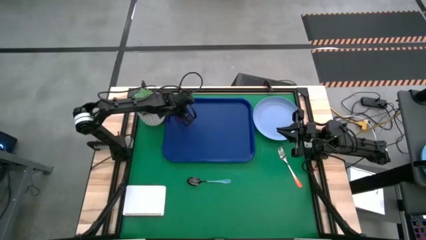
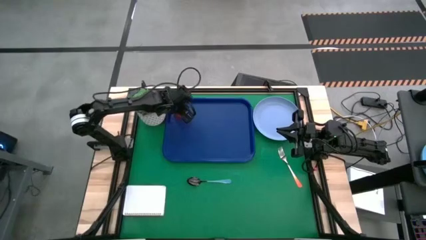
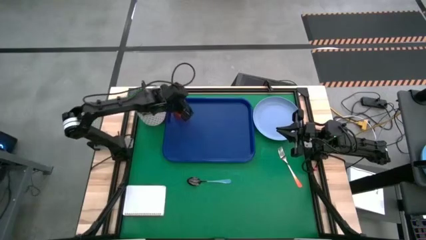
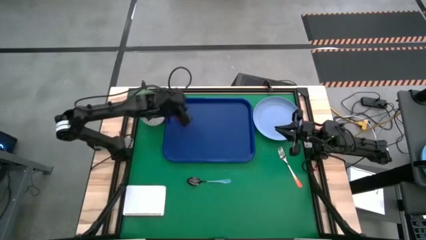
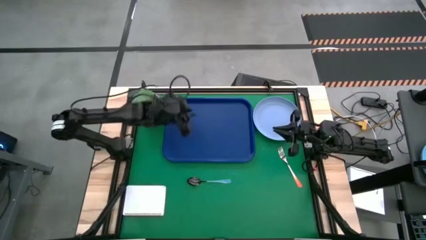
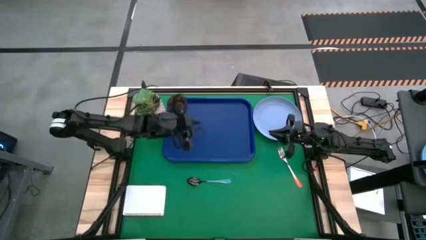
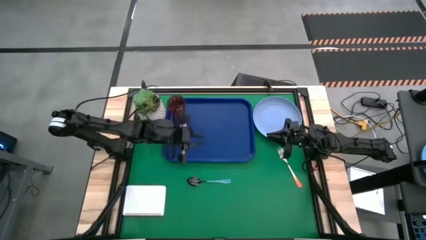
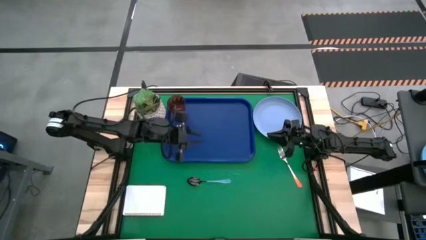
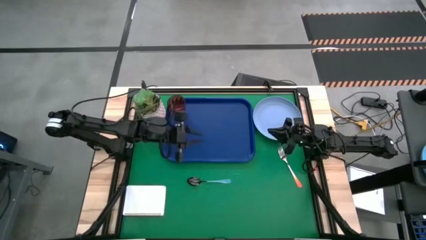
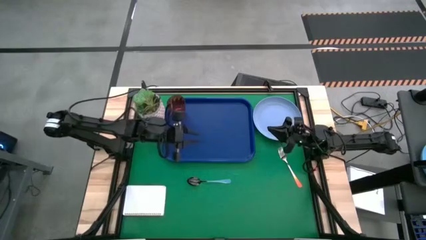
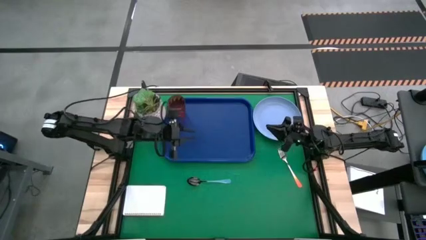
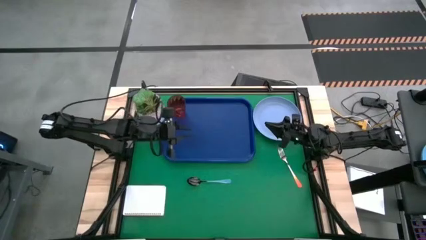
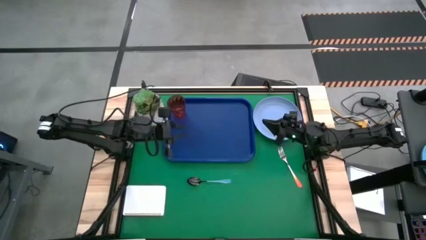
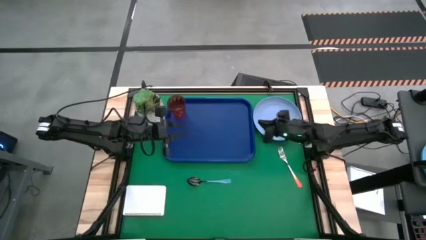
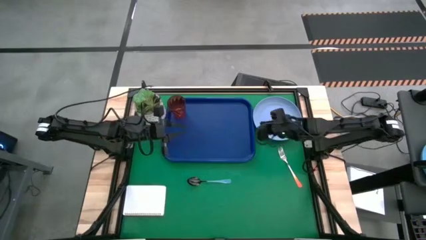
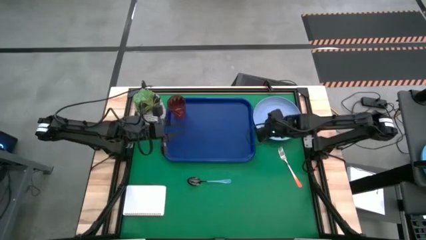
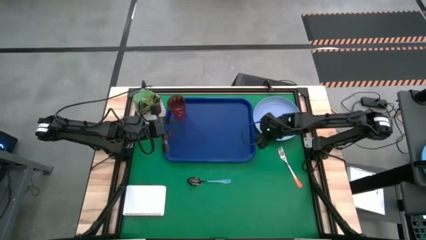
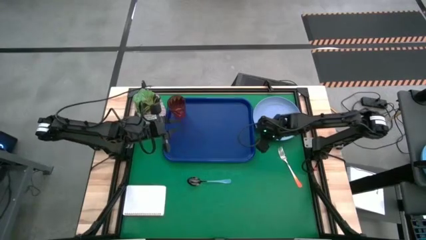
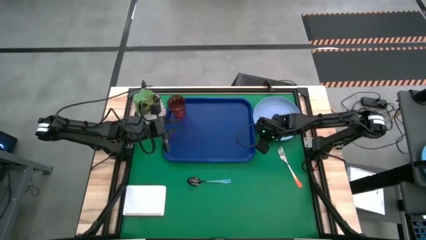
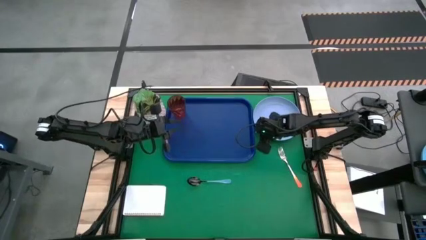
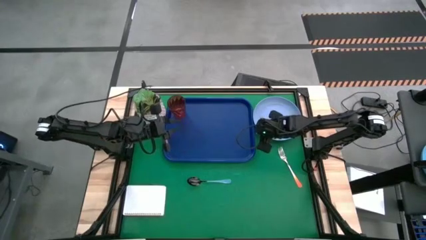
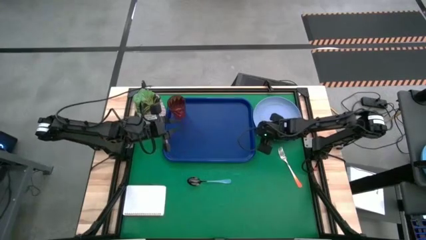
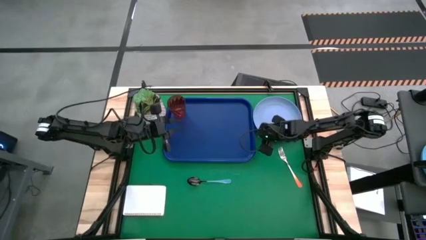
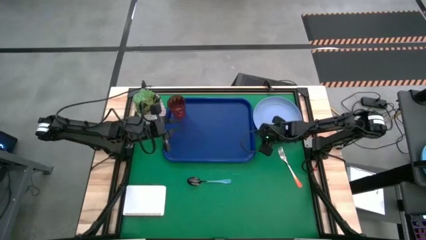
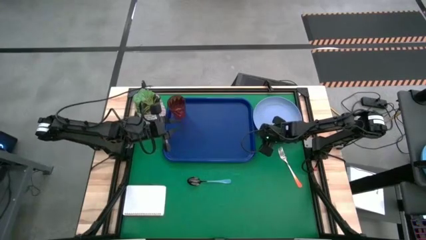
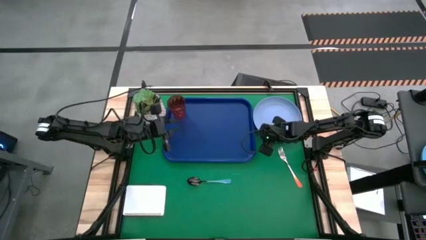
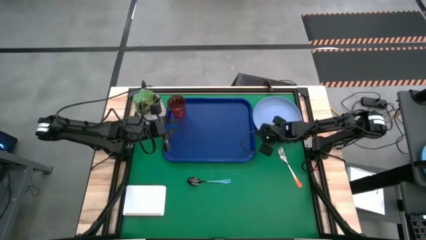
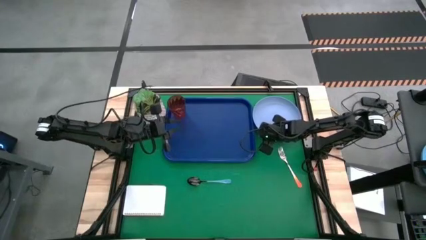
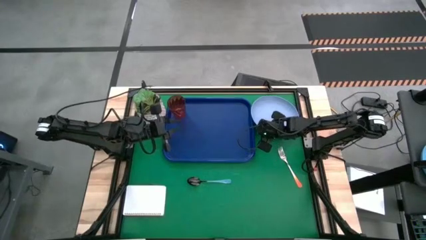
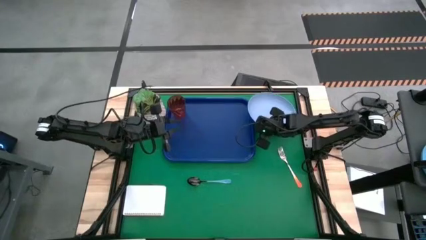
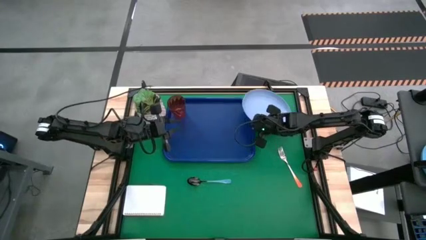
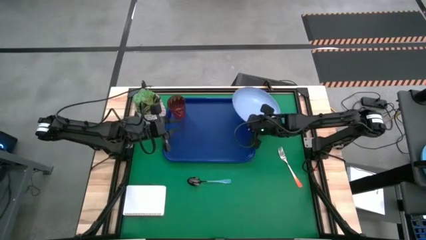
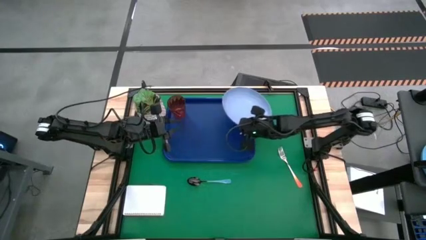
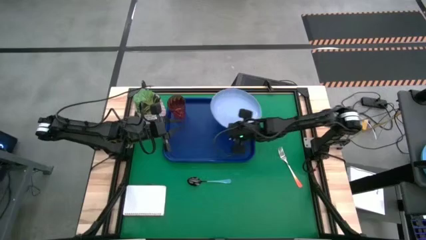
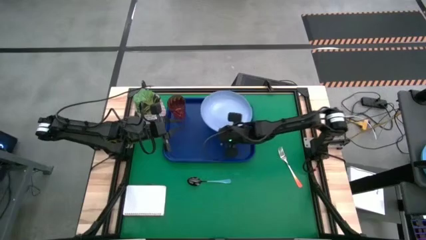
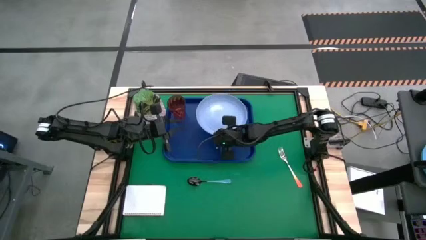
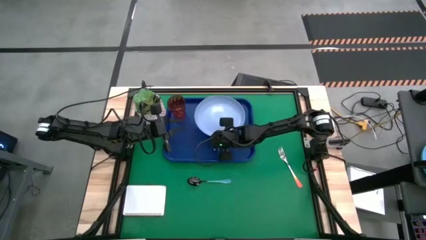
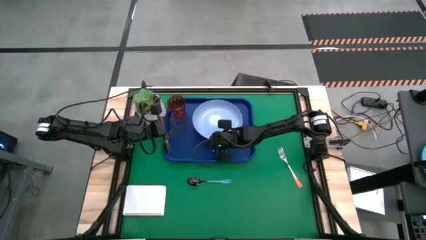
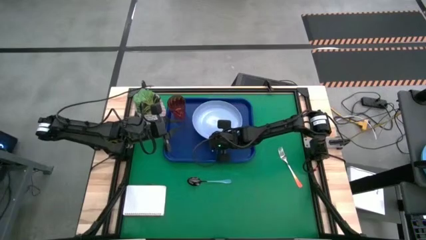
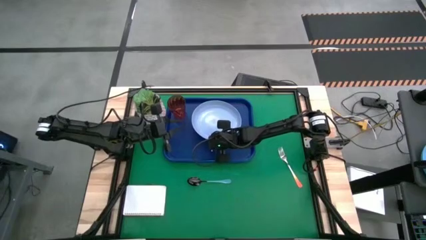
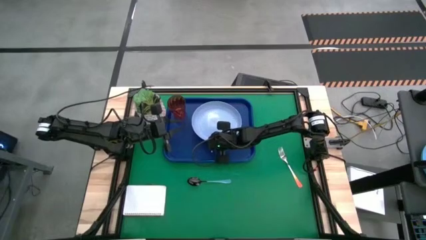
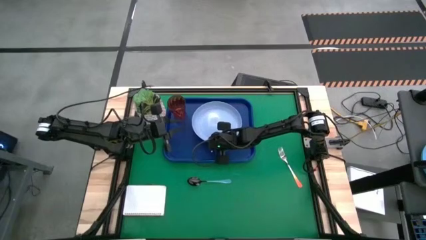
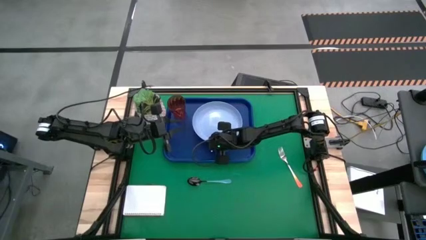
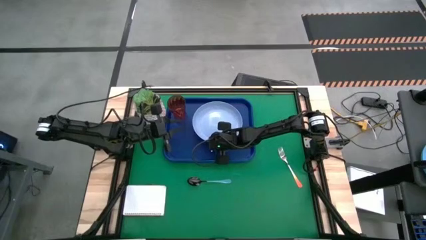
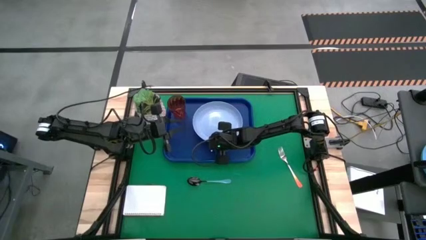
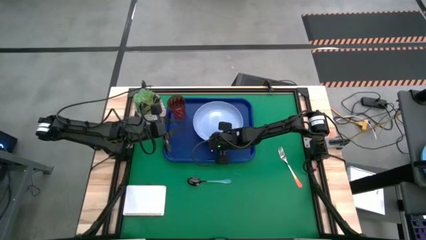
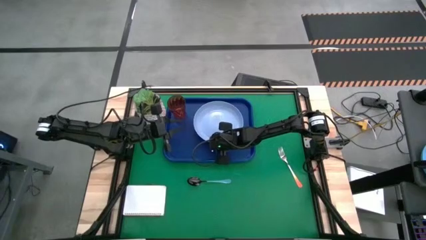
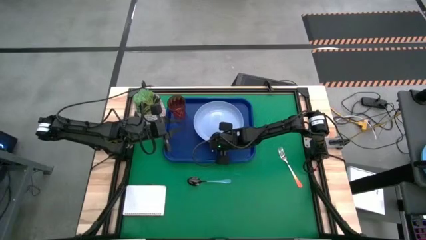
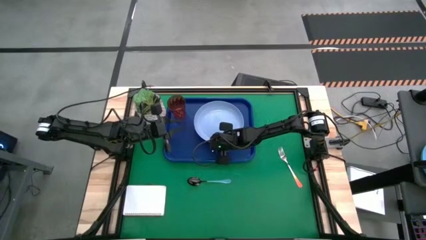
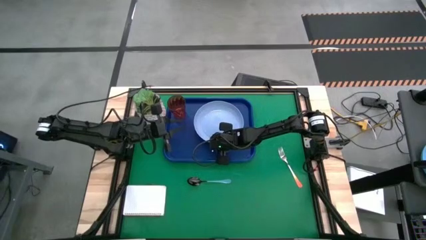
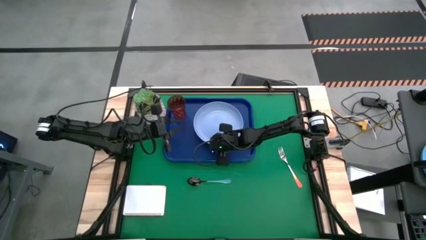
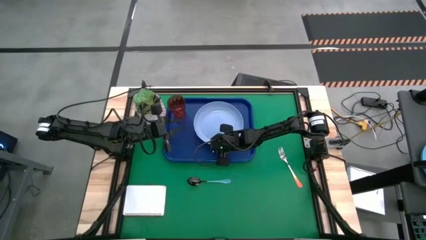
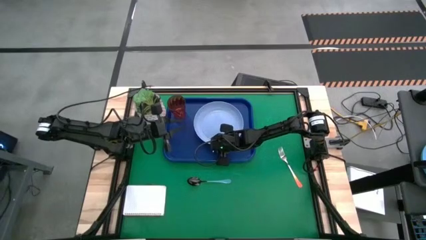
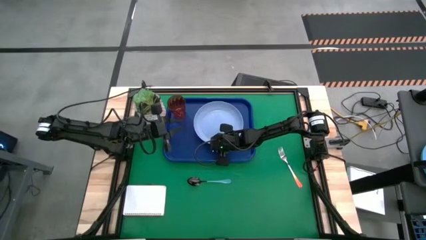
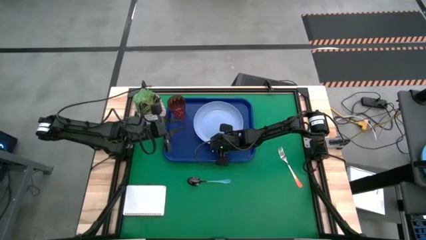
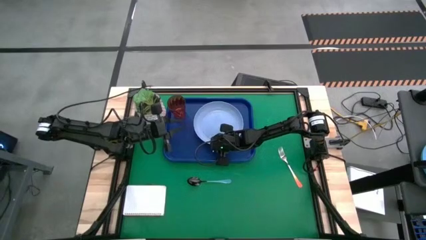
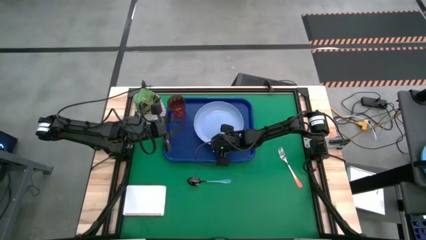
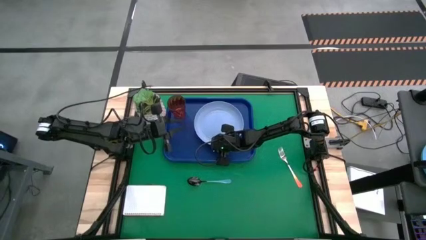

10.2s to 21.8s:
Task: Pick and place plate/cup/fork/spoon on tray
Put the blue plate on the blue tray to the right of the red cup
